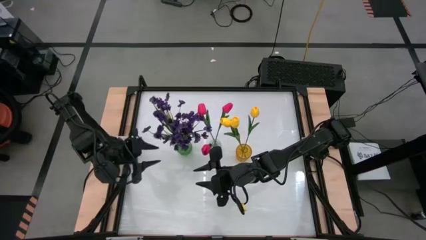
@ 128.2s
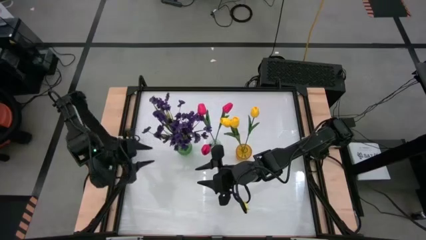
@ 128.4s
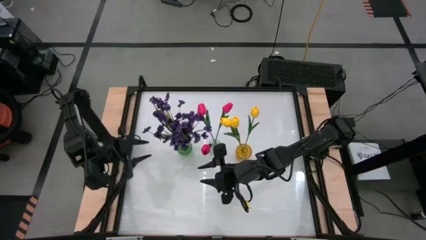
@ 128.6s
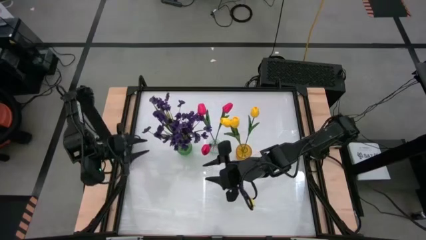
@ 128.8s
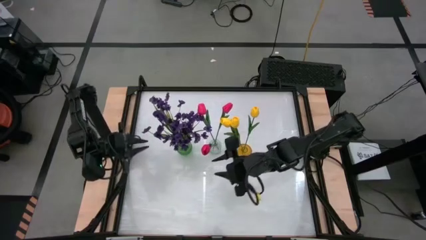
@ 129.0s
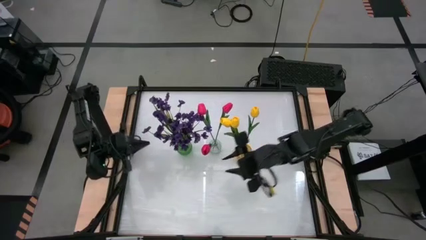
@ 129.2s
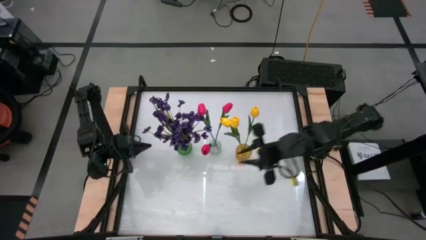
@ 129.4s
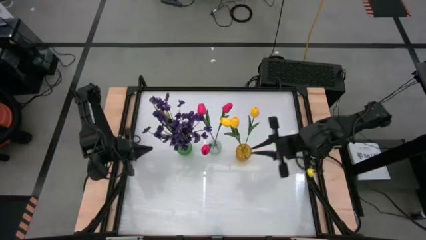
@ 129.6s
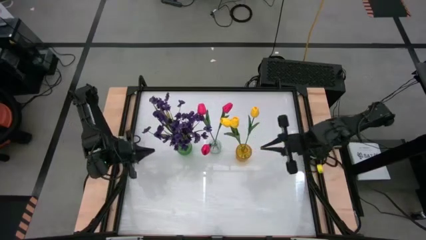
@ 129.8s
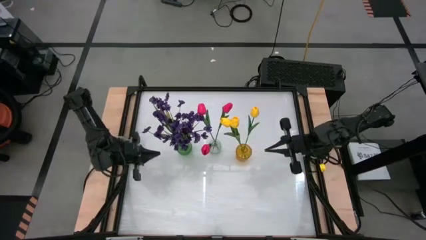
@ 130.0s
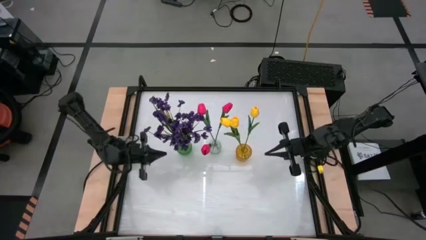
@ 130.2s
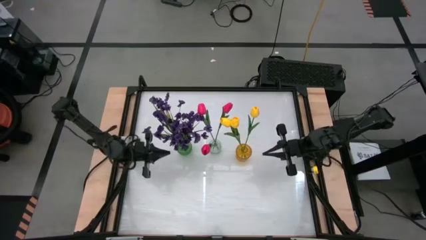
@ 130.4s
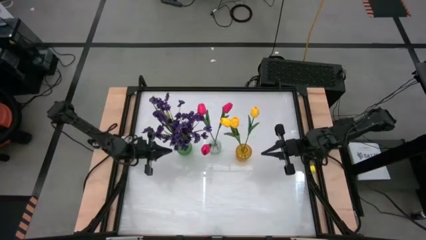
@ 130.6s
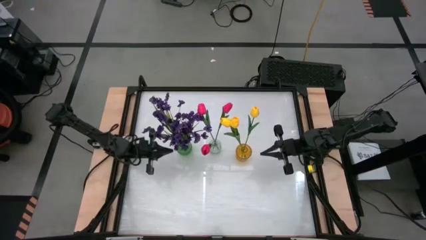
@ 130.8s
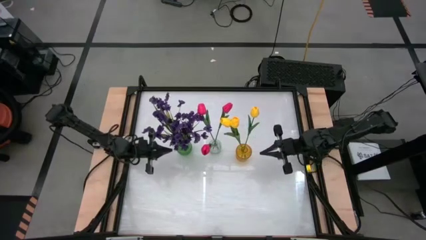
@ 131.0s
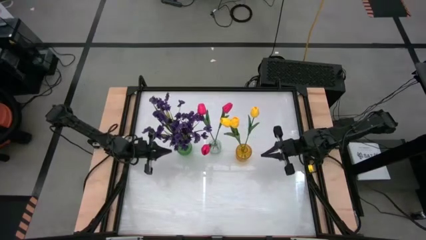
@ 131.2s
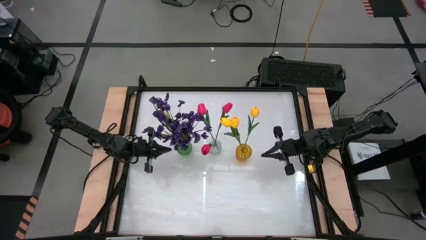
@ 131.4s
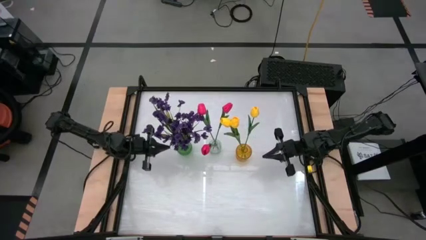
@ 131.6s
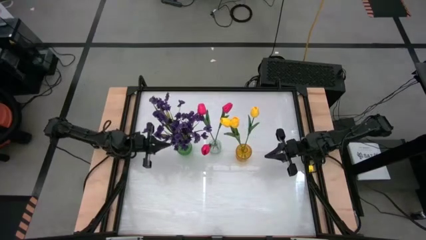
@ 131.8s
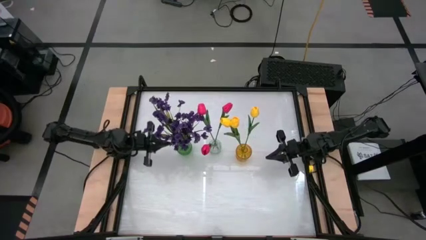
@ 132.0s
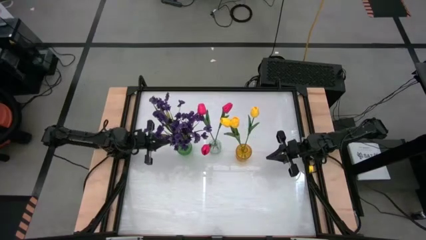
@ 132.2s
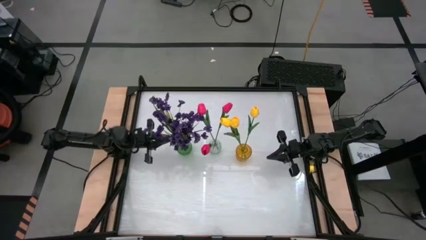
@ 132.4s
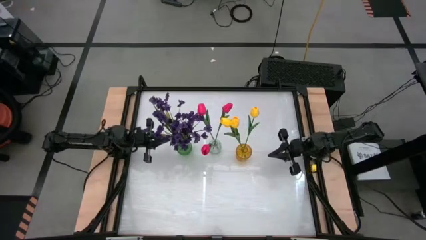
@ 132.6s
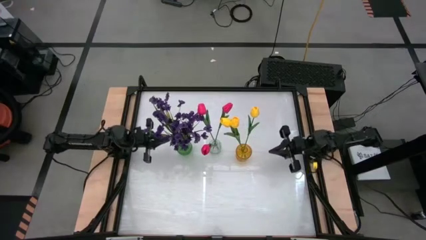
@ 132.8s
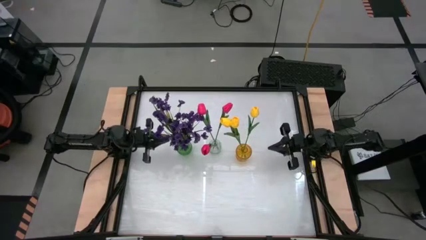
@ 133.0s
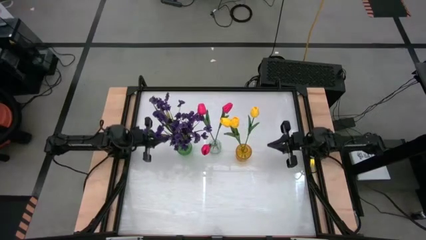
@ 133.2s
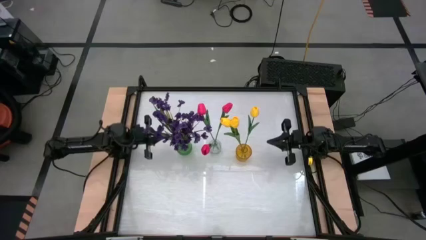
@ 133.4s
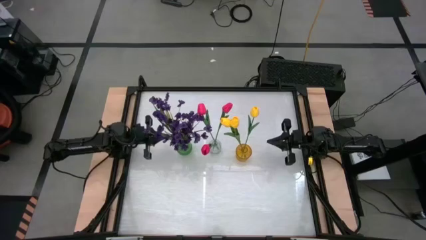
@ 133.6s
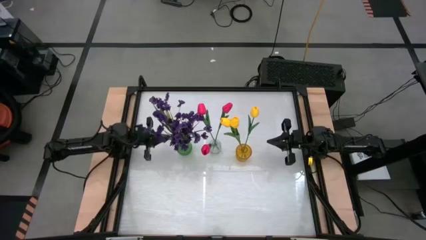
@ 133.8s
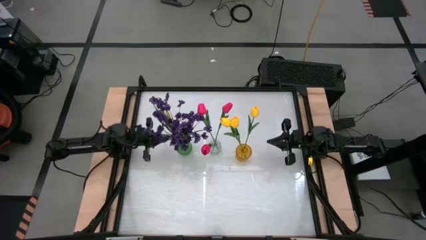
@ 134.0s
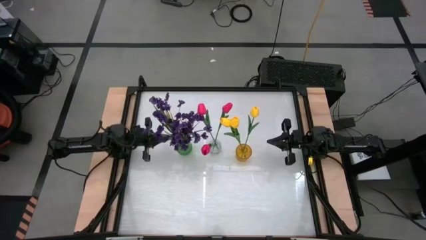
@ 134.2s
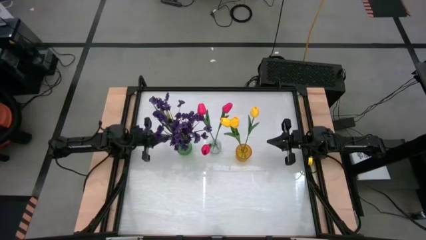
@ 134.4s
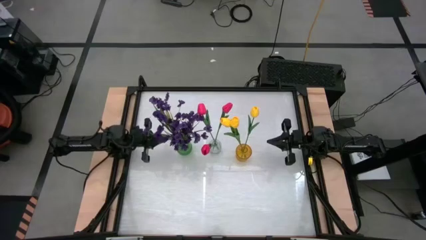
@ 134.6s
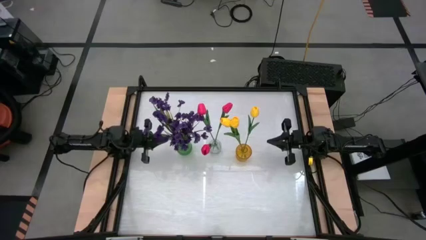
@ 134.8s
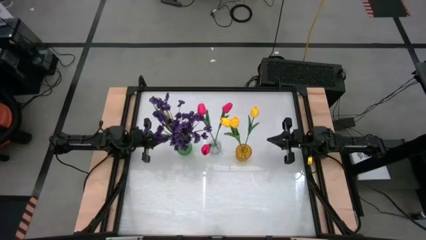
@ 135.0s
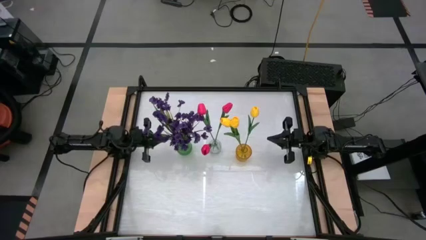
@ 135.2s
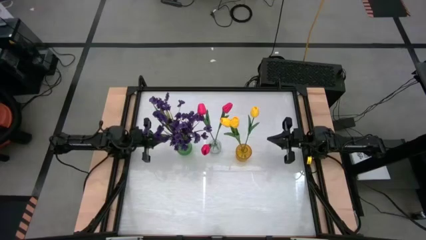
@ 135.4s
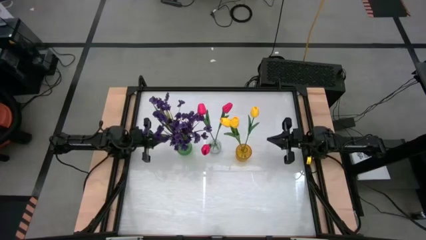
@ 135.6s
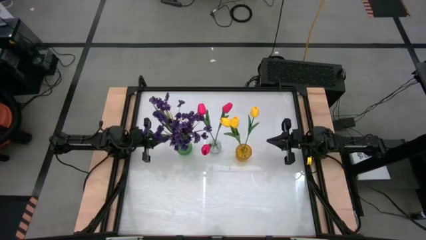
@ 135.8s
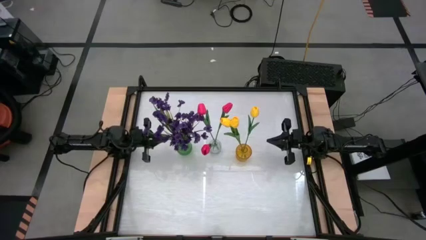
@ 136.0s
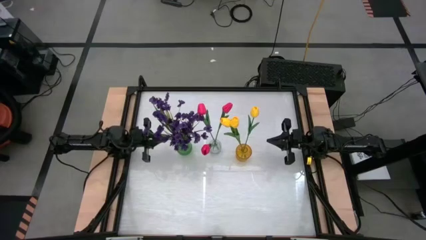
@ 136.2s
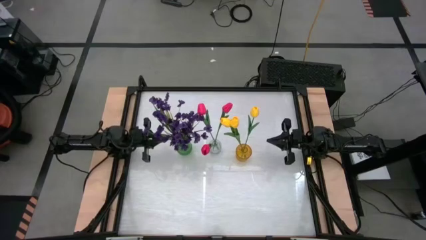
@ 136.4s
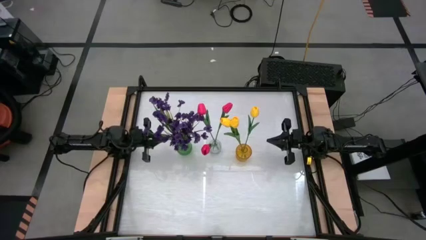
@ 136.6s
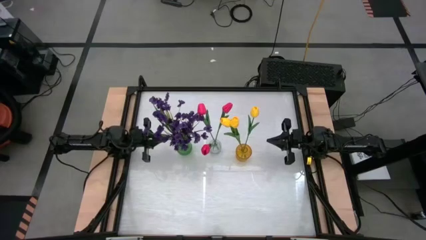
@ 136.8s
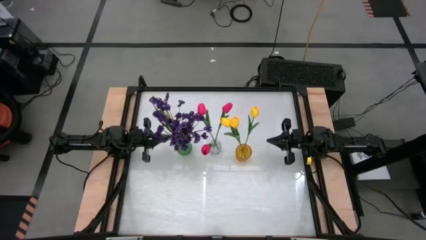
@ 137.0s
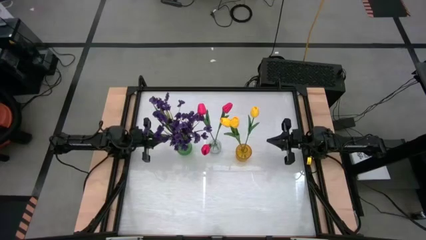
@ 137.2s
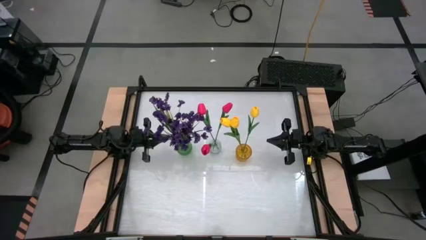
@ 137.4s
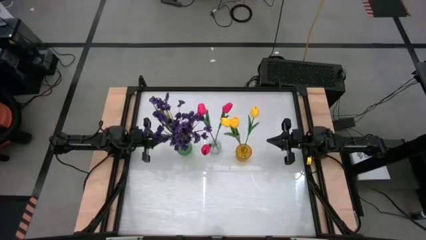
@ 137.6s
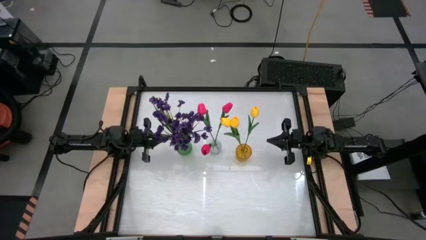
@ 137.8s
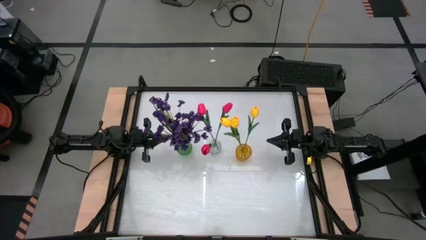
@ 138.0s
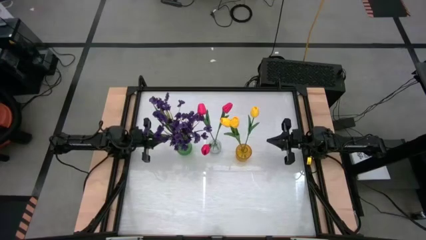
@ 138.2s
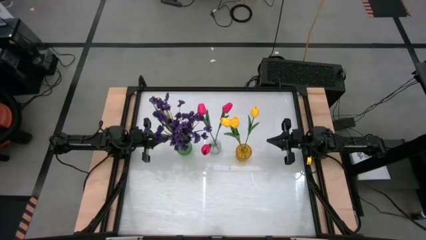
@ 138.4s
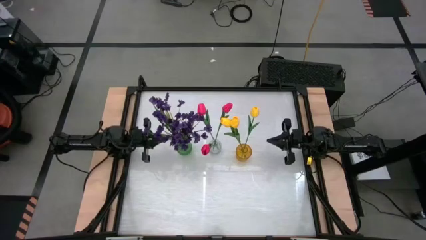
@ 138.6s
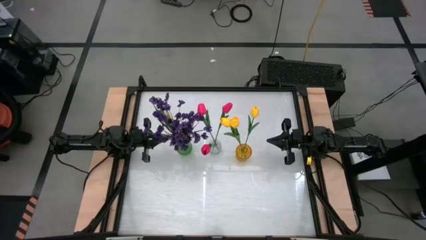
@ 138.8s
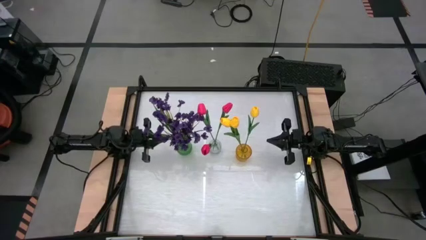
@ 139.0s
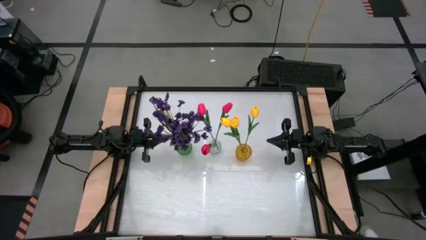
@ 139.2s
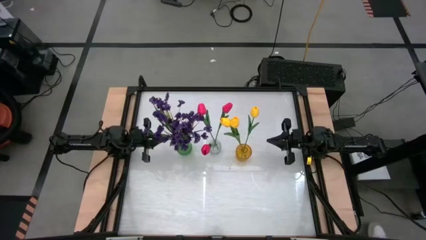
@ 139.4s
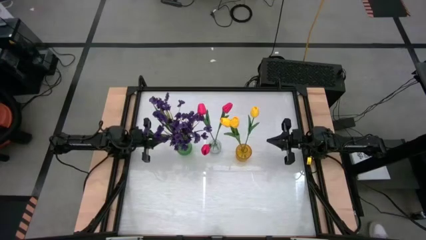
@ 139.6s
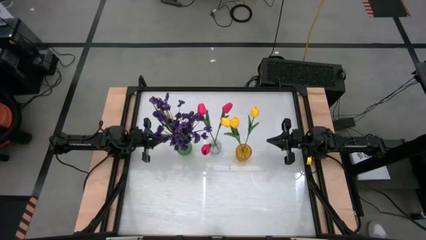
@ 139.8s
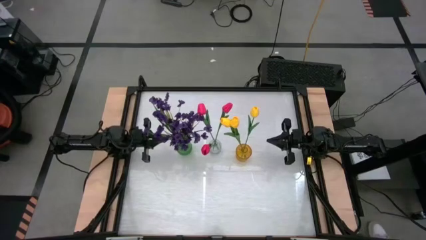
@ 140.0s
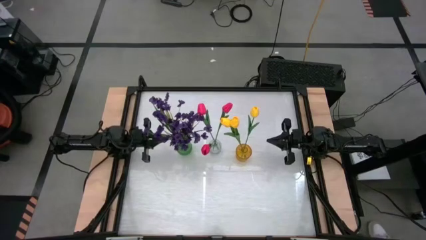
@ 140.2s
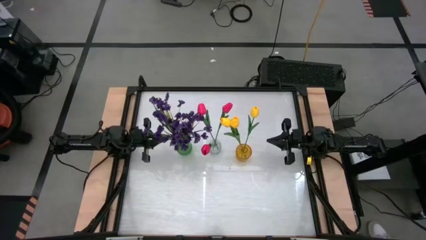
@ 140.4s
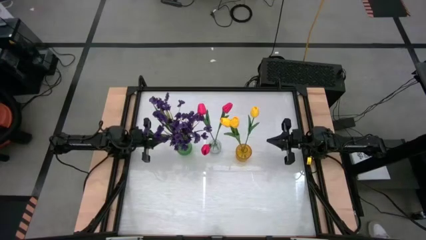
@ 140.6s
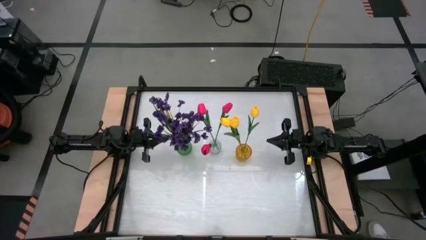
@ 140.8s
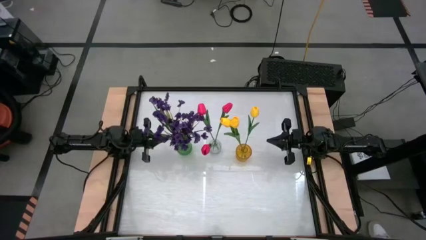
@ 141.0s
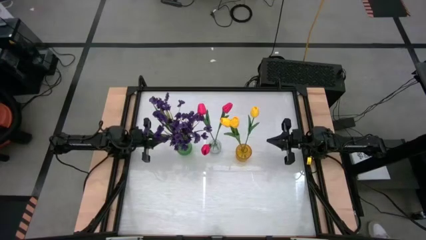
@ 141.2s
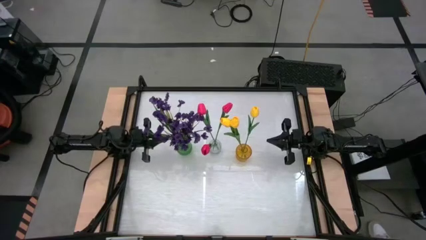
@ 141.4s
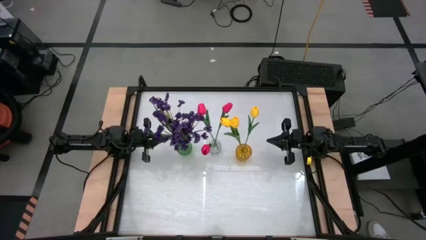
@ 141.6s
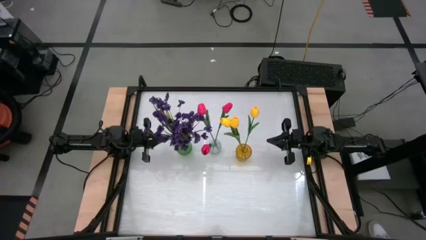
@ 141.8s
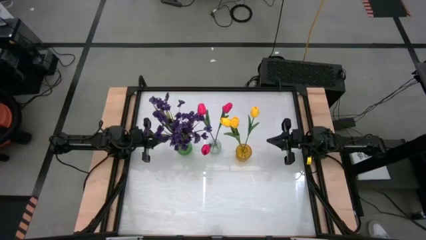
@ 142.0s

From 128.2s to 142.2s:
Task: Sort flowers into vase by color
Return to Home Position

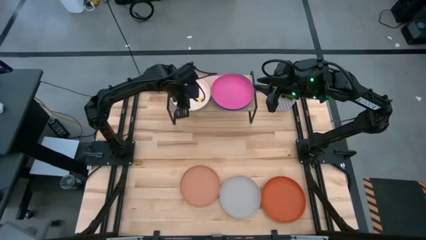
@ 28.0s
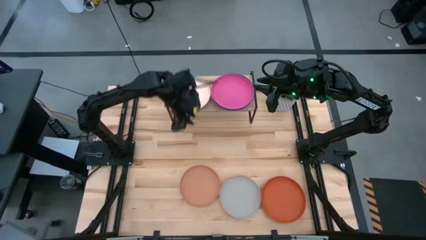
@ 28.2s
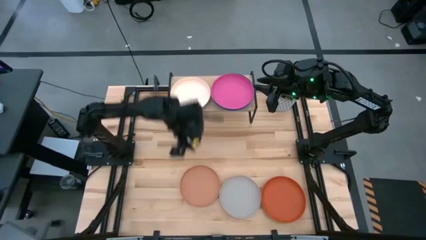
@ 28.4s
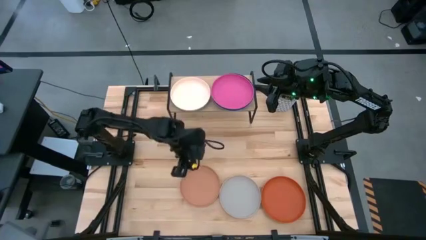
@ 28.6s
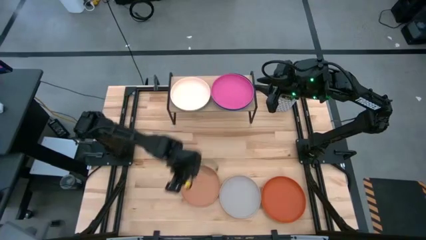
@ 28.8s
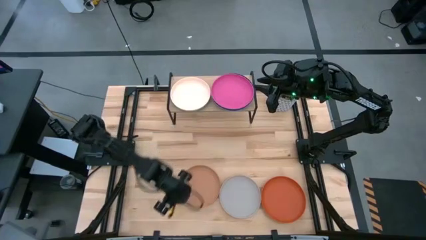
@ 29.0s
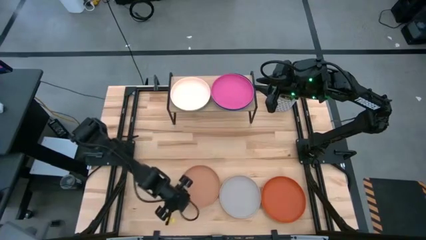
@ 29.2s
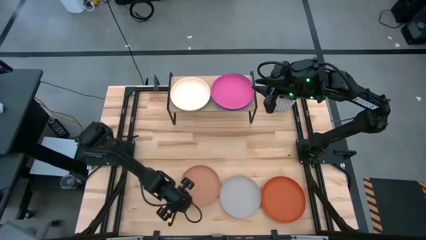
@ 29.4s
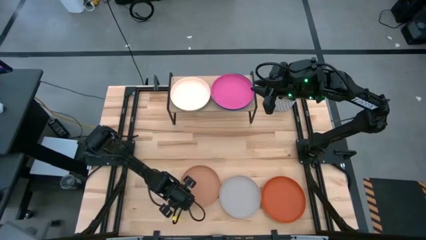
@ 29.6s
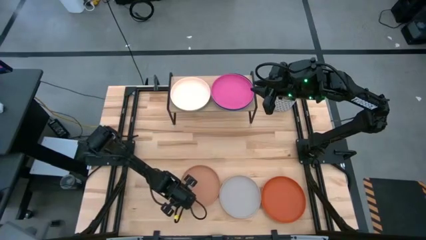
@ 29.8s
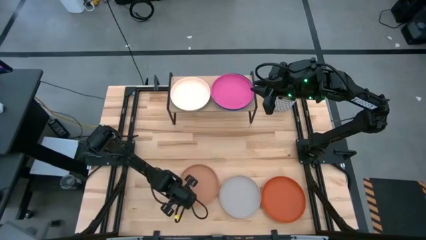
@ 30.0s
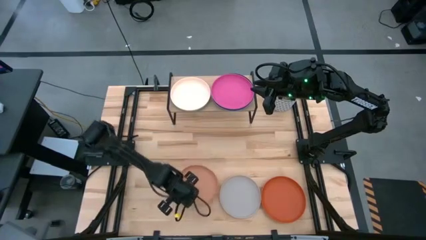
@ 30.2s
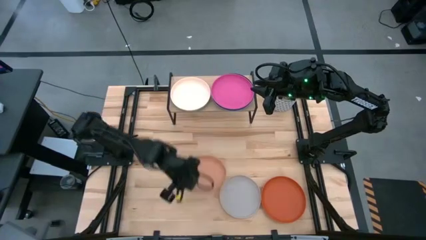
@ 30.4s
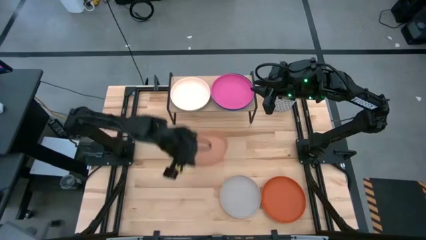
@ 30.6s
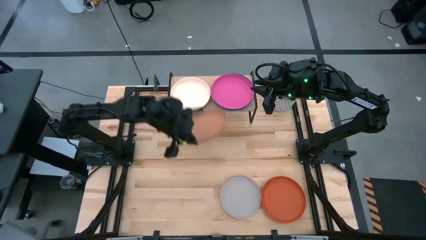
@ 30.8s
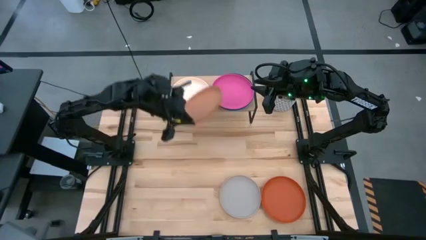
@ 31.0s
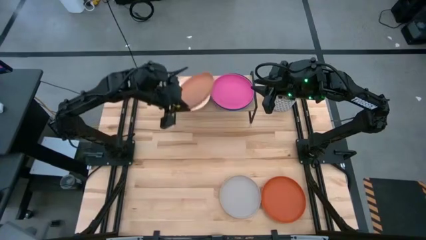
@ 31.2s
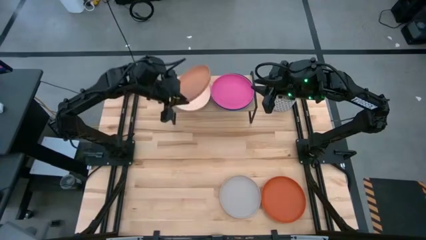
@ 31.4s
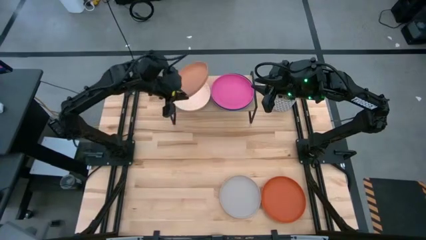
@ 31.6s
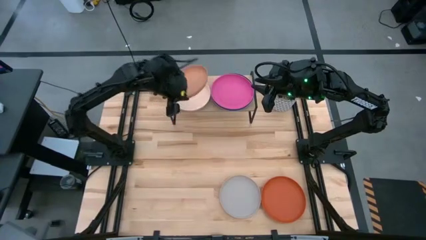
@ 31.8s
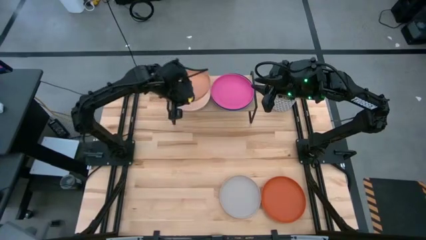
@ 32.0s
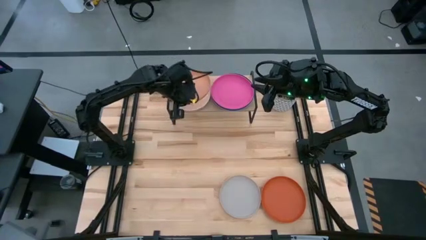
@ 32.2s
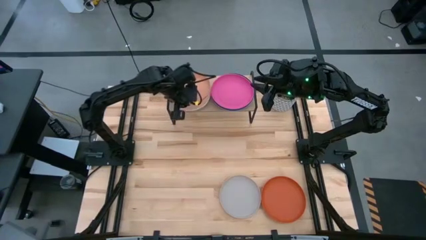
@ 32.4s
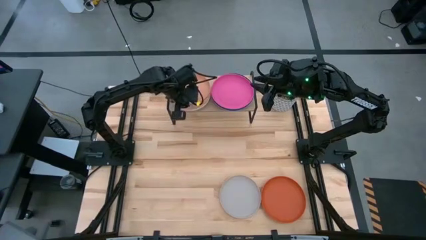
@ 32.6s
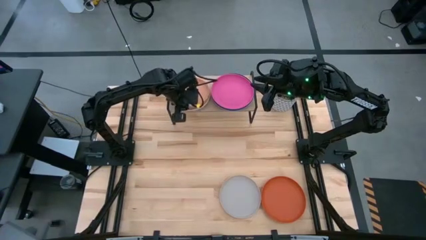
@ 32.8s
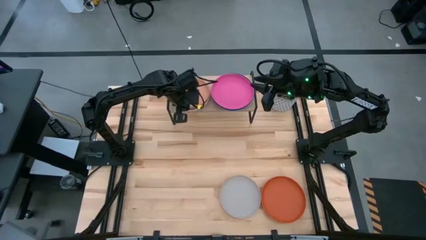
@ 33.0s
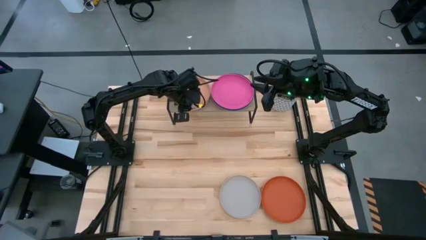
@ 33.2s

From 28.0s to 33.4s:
Task: Place and stack plates onto a shelf
Stack the brown plate on top of the light orange plate on the shelf
